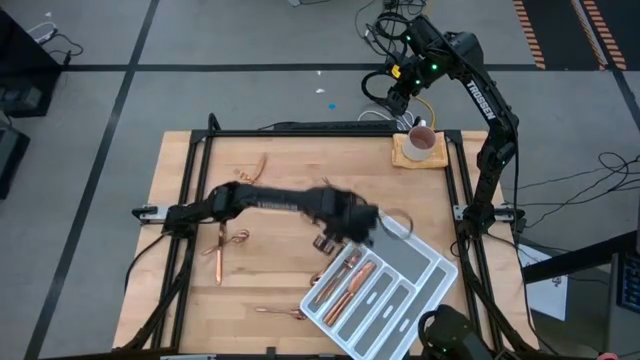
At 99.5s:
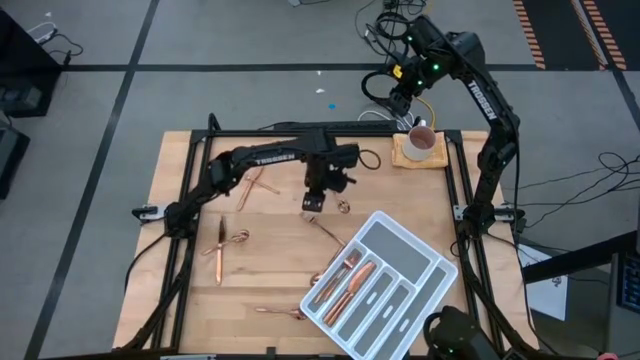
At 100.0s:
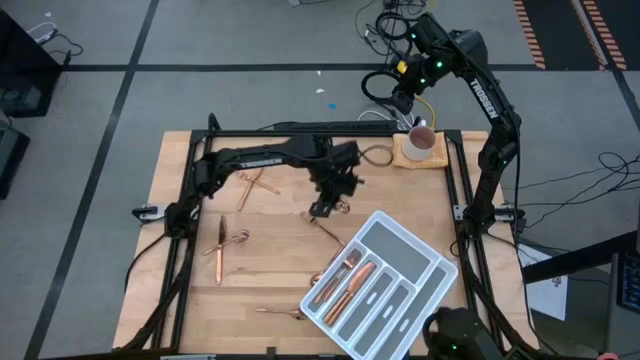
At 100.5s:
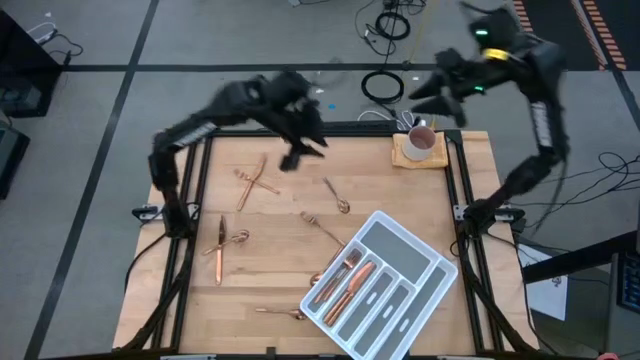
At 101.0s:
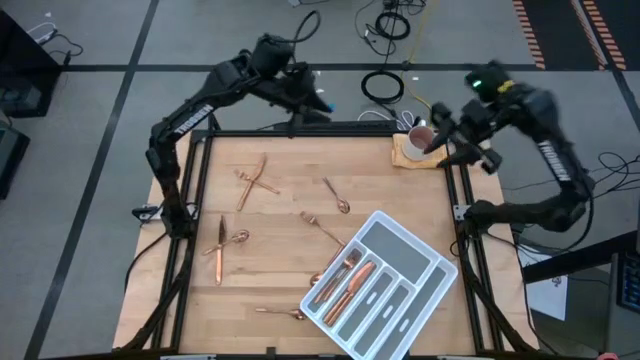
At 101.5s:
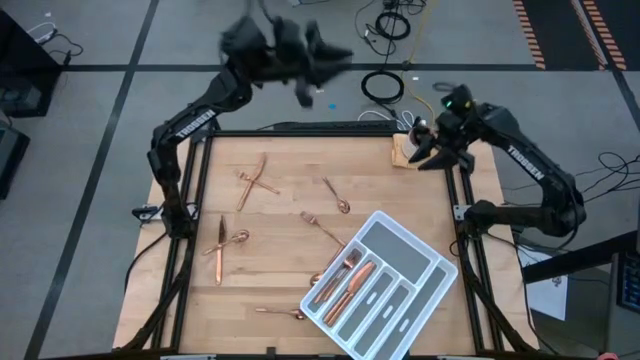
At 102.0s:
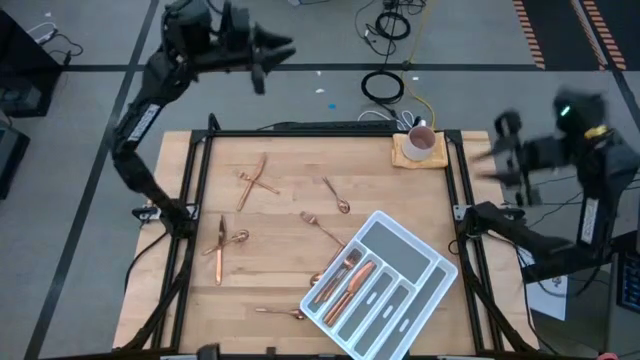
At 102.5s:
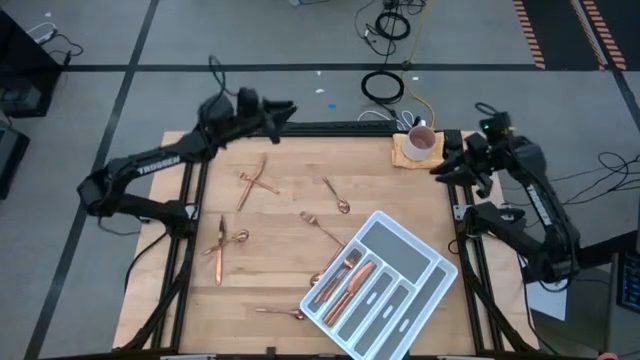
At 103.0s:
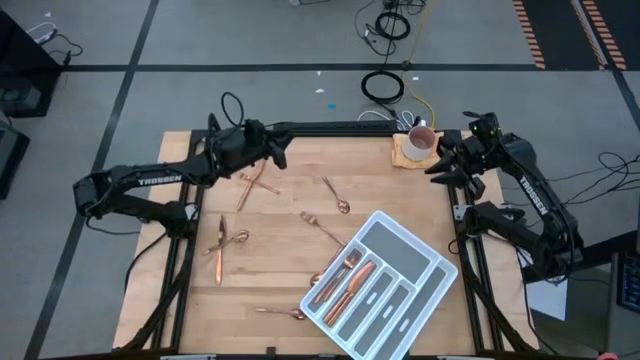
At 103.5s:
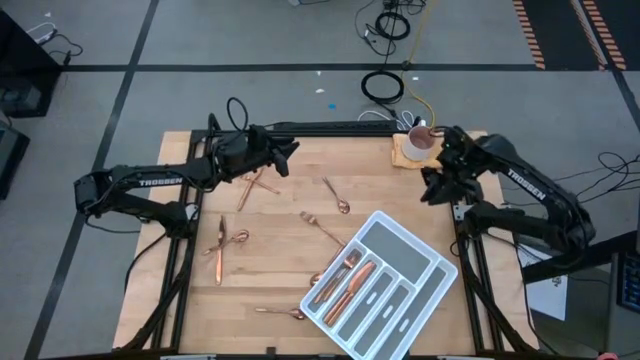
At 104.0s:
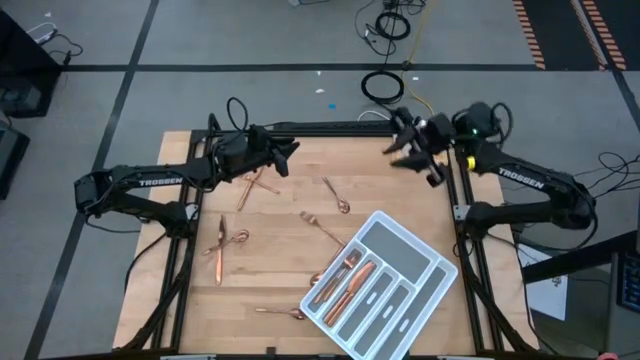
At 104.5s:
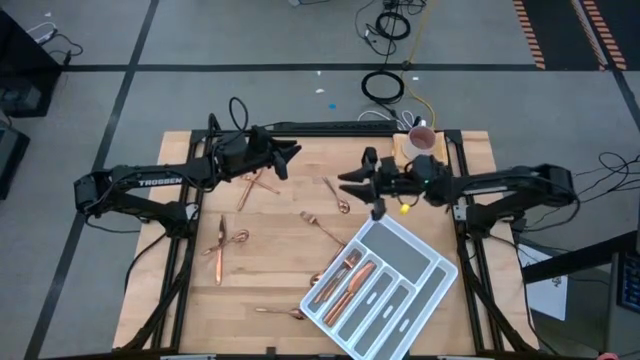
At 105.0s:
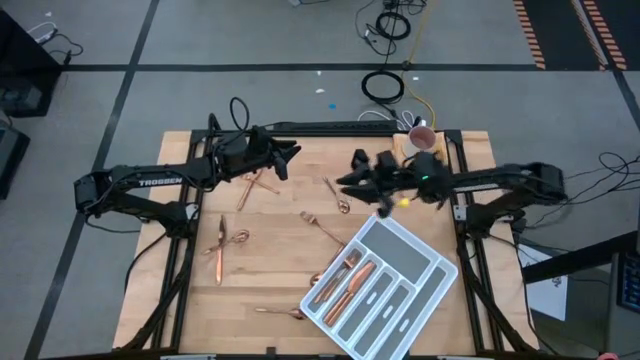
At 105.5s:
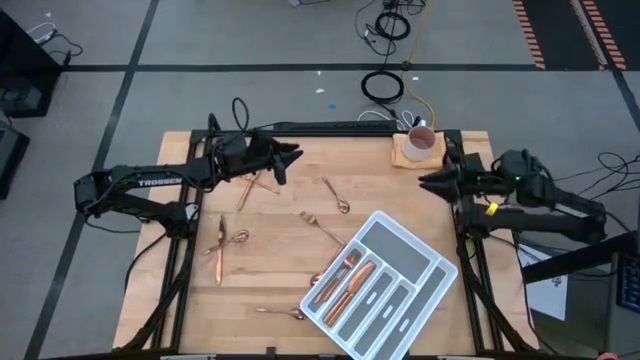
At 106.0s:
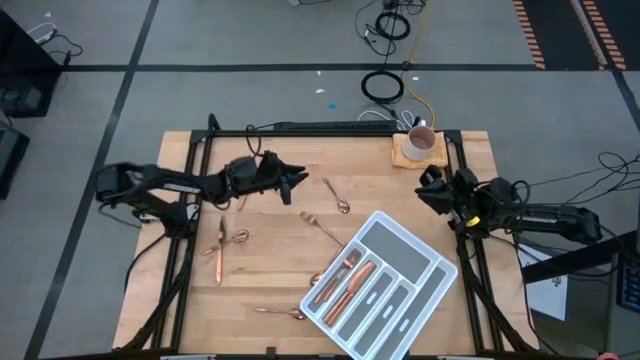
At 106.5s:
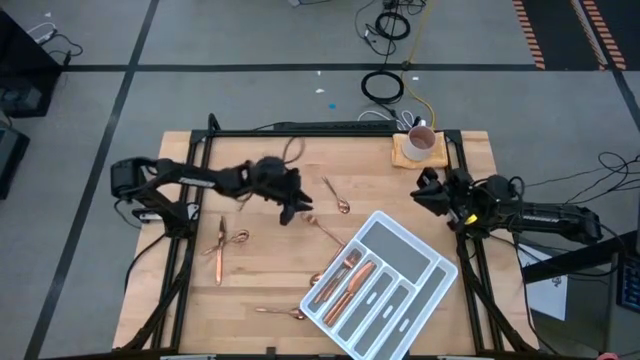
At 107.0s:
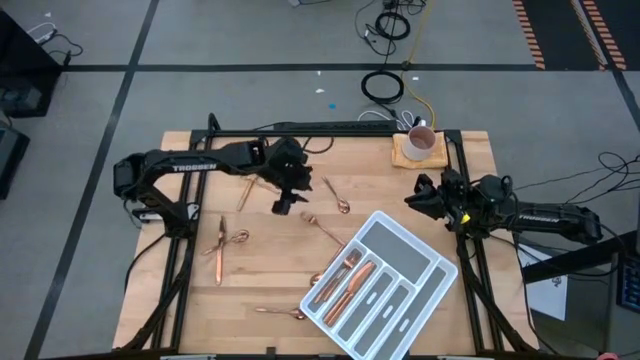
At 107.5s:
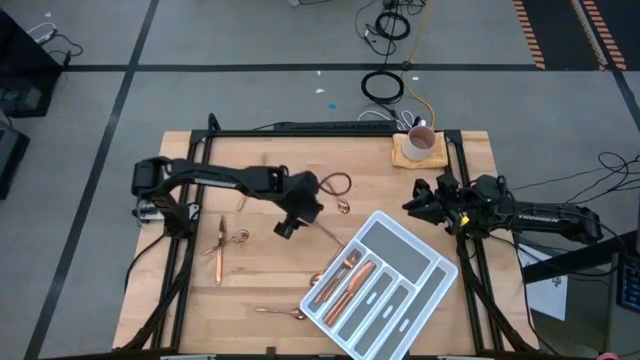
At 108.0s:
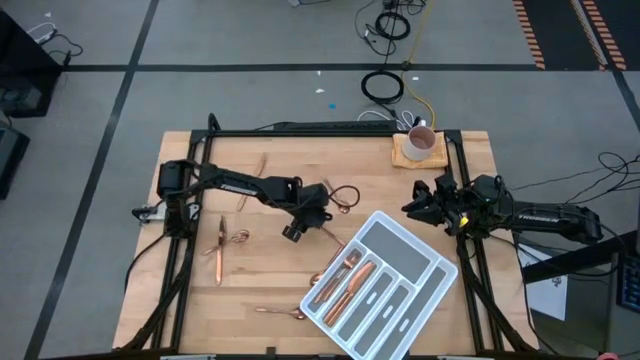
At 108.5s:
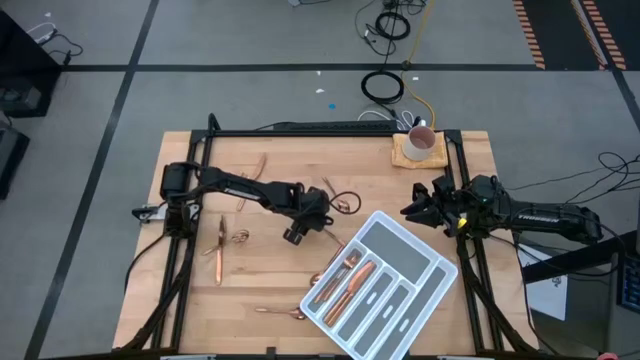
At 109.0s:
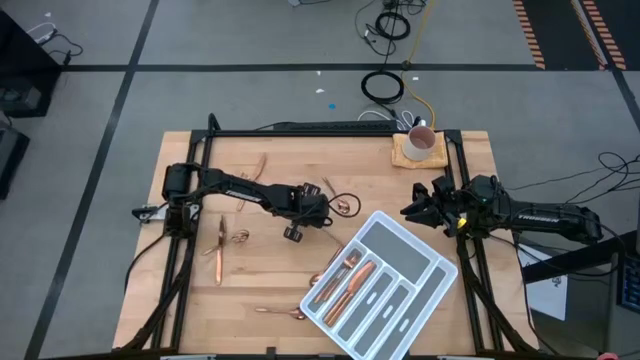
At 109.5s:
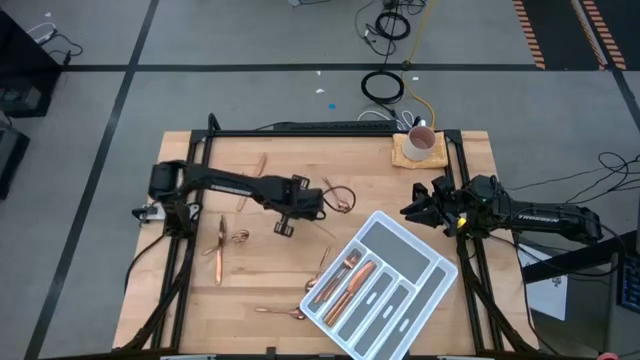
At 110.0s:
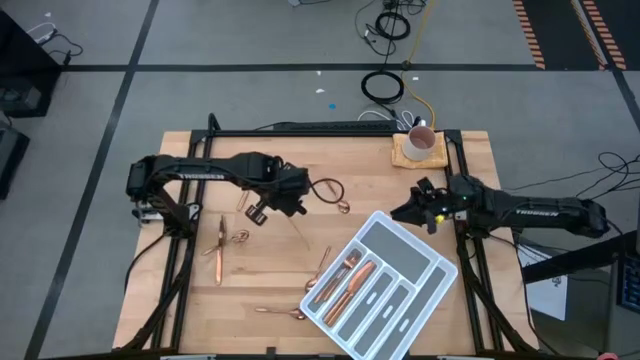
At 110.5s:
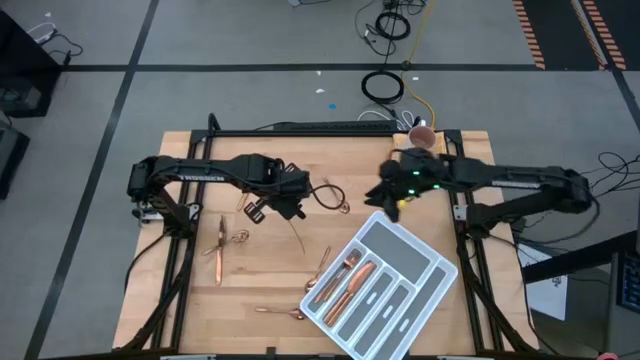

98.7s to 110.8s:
Task: Sort silverware
Put the gold fork into the silverware tray

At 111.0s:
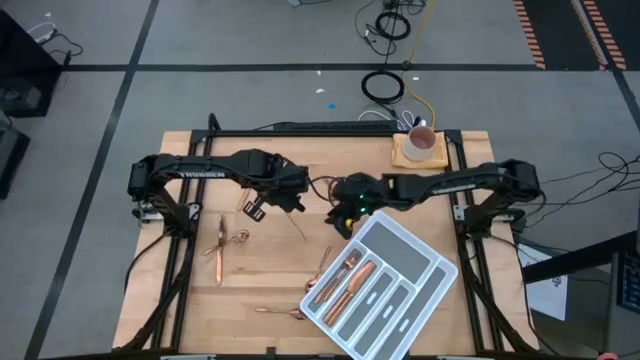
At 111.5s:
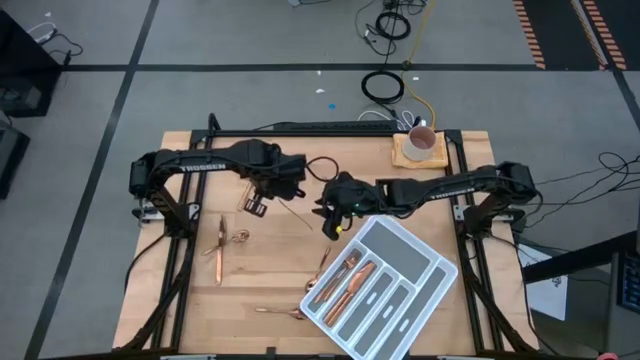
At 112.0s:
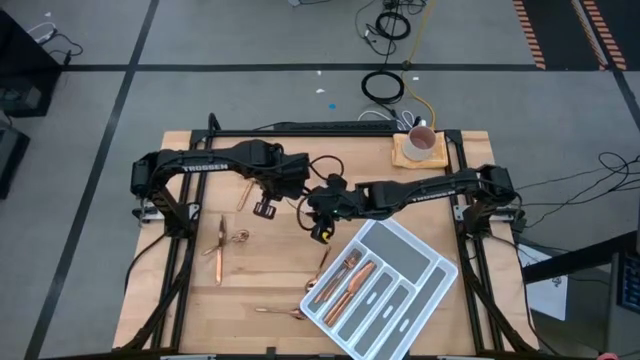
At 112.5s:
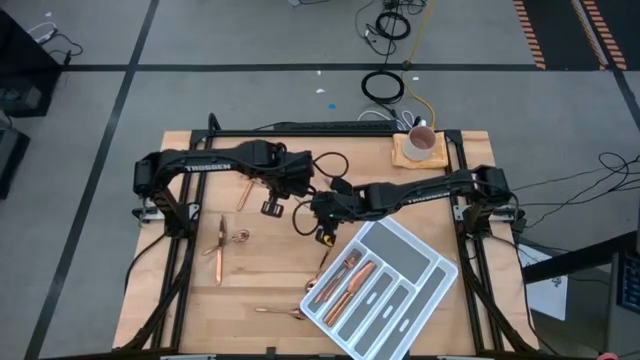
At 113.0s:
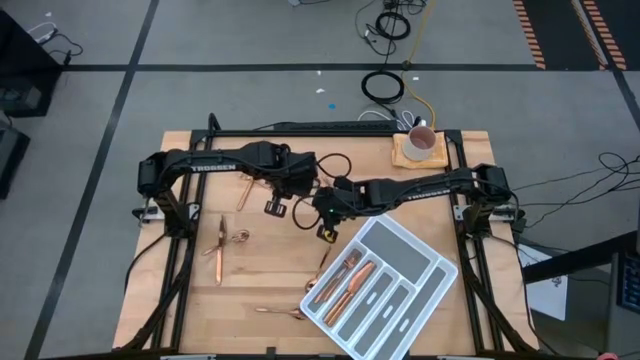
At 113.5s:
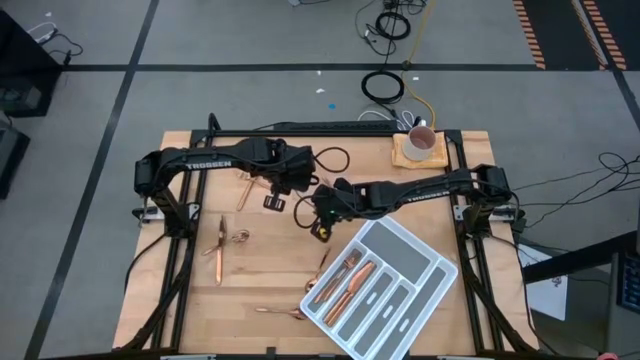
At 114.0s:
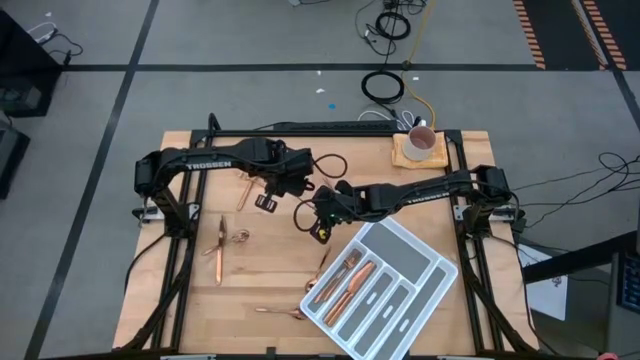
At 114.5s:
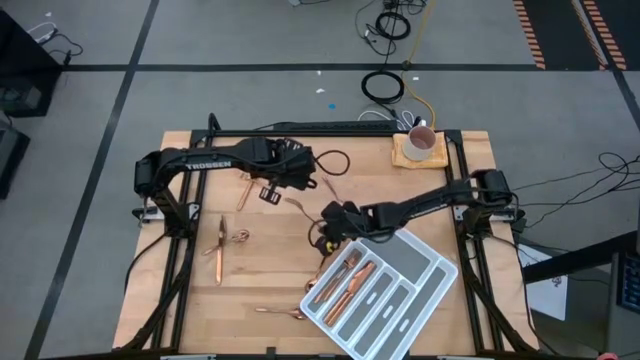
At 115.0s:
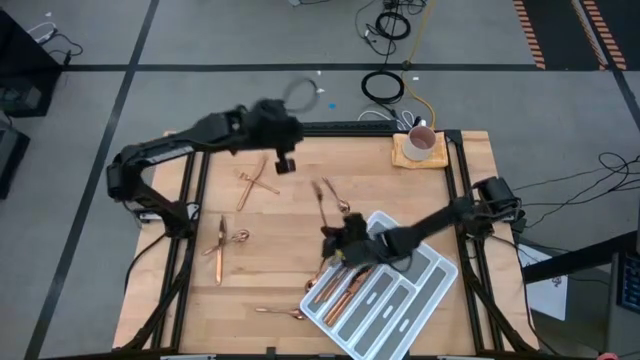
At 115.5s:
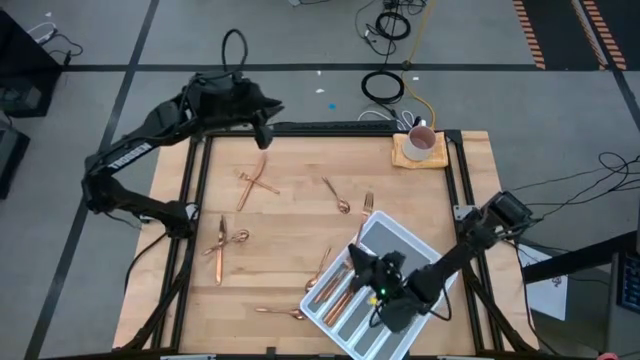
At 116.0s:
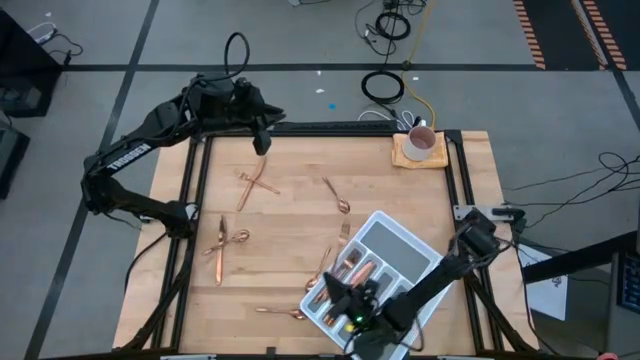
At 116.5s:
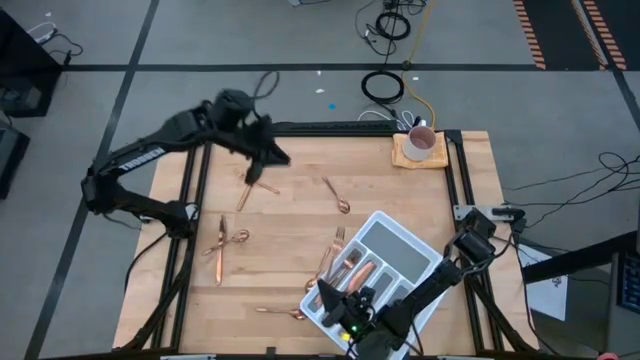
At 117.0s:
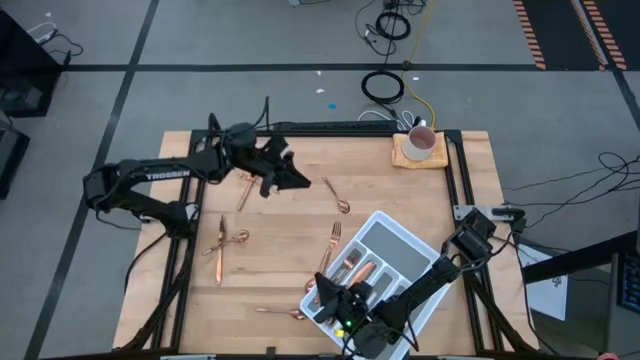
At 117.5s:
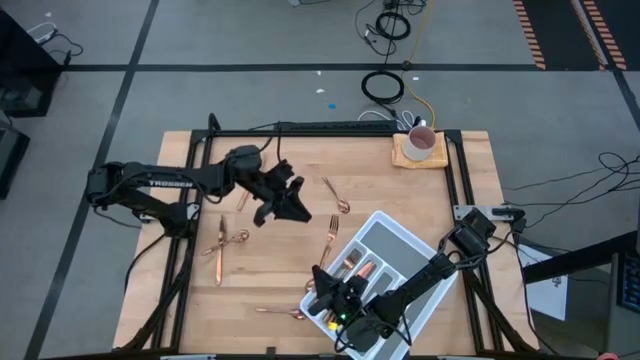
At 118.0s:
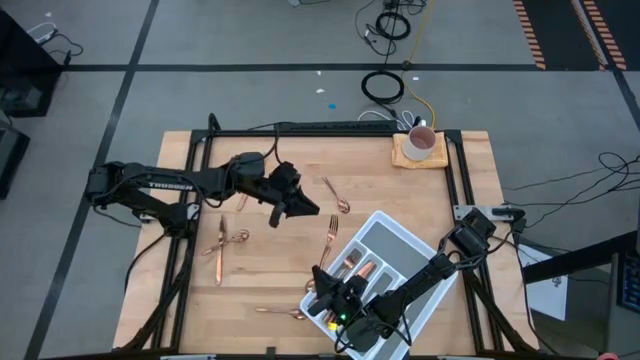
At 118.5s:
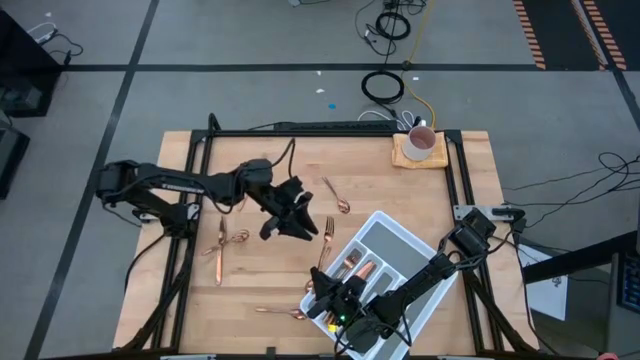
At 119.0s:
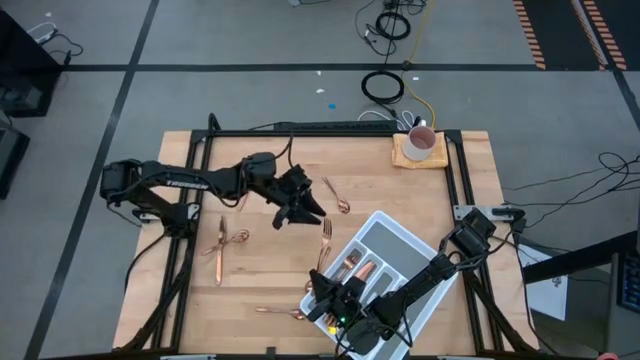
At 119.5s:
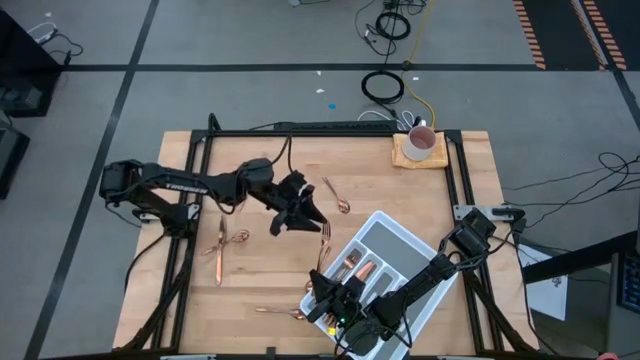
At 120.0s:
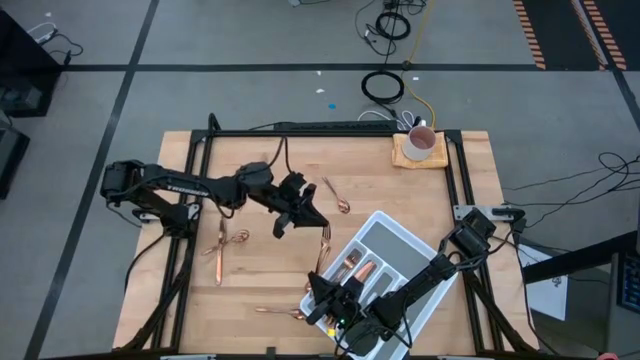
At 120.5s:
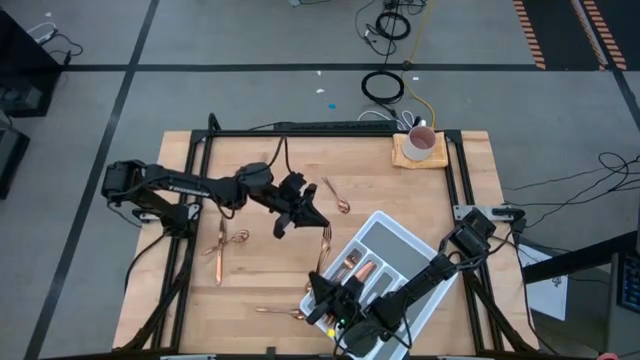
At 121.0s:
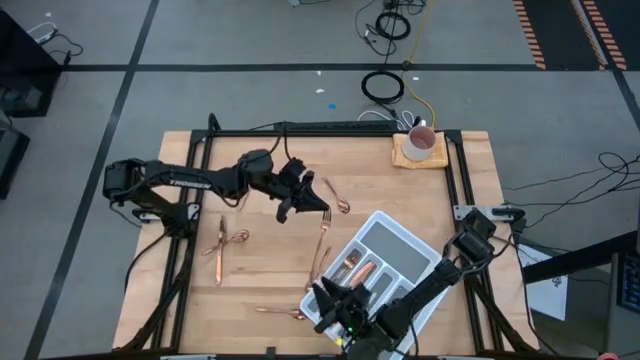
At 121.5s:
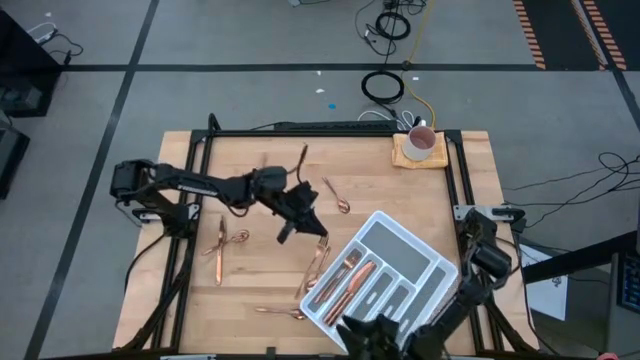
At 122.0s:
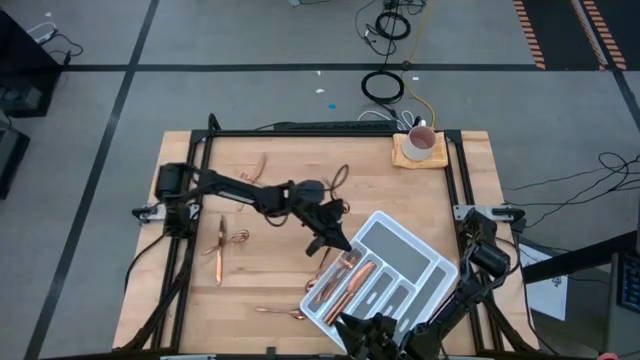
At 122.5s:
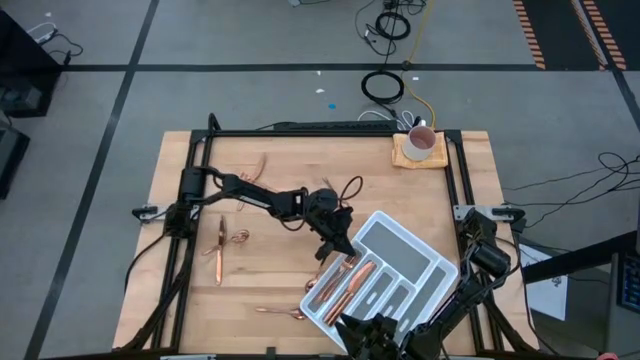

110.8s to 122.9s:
Put the gold fork into the silverware tray
